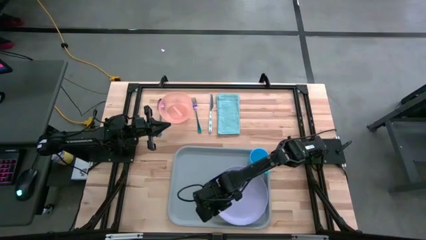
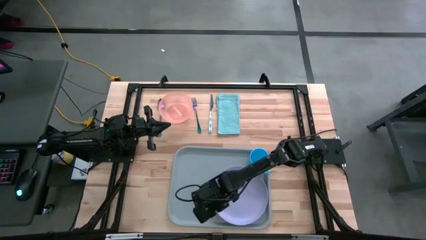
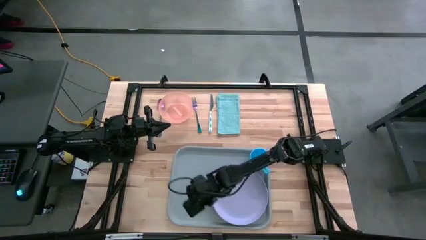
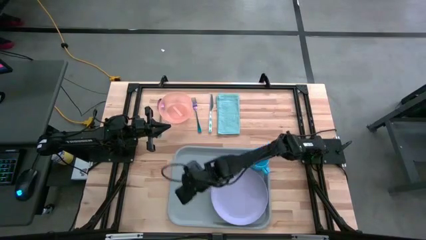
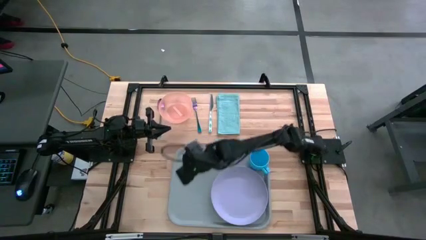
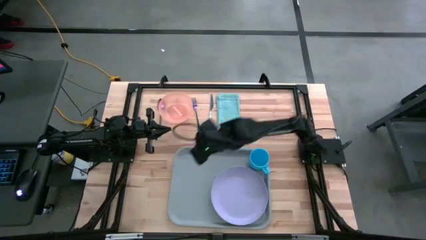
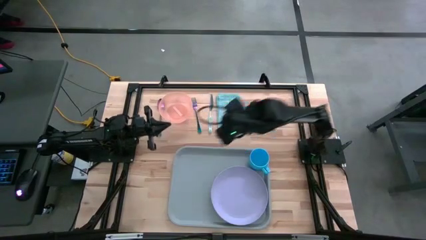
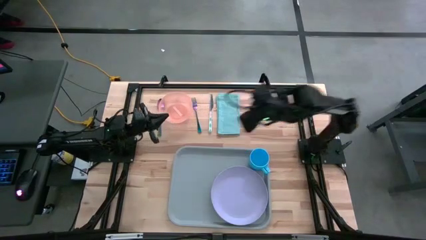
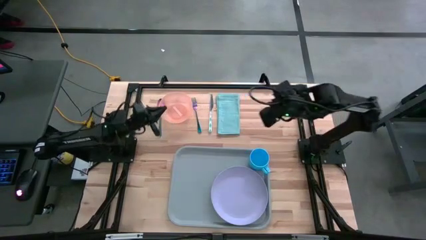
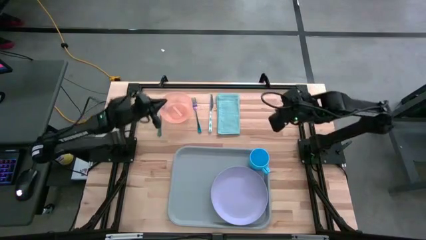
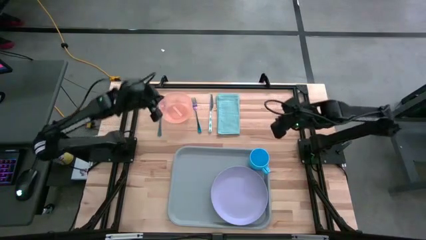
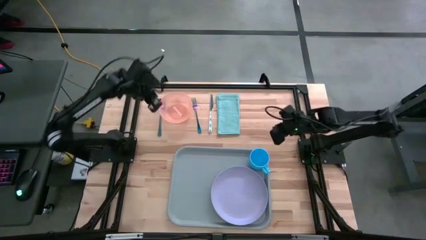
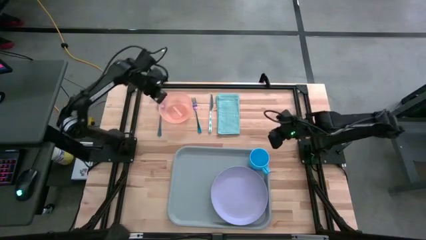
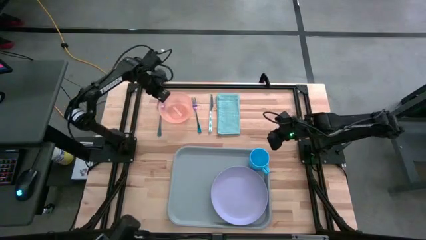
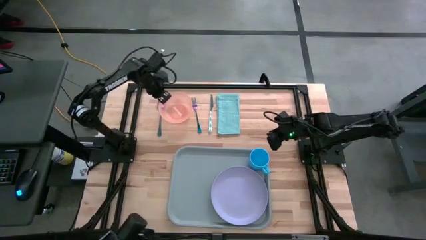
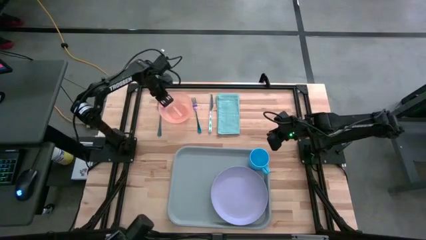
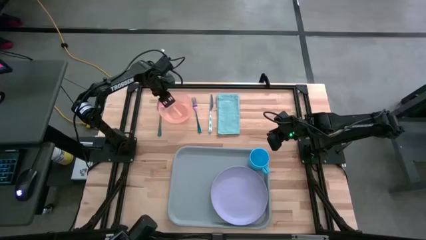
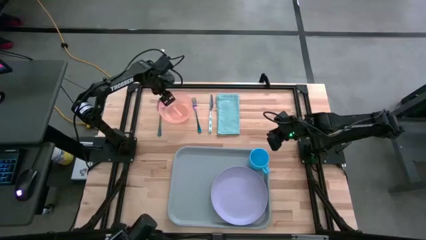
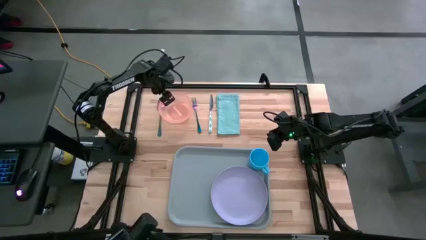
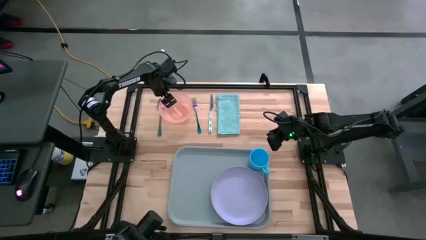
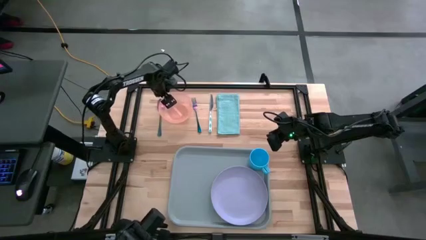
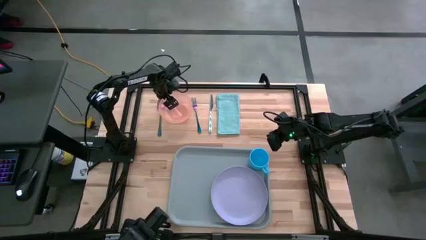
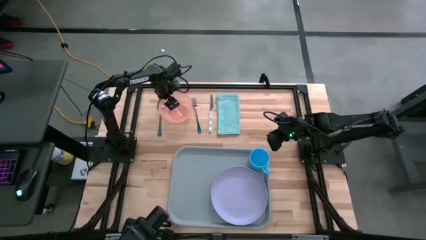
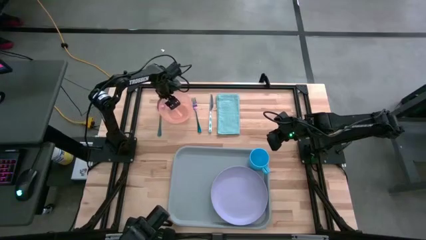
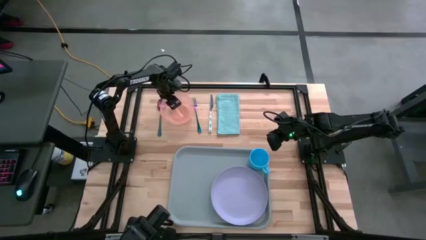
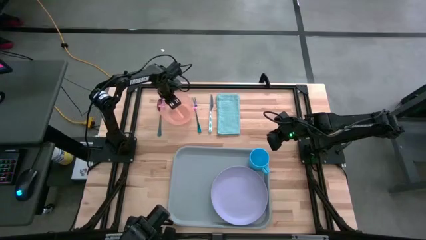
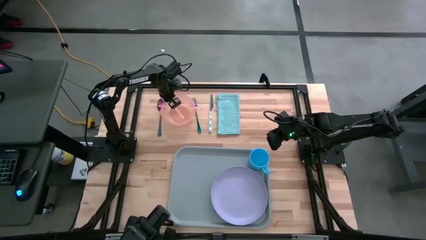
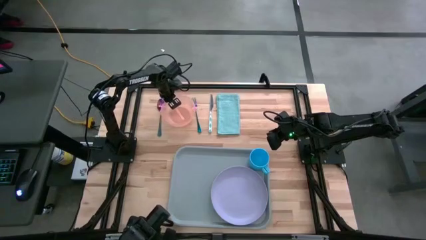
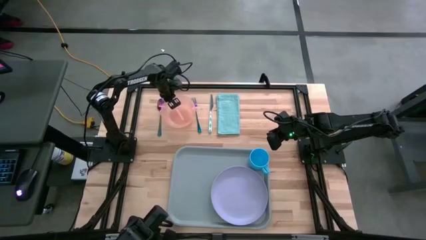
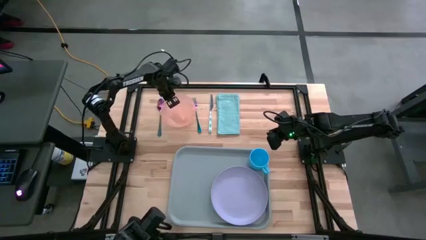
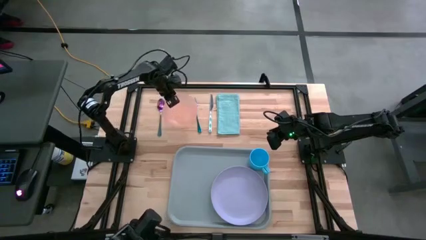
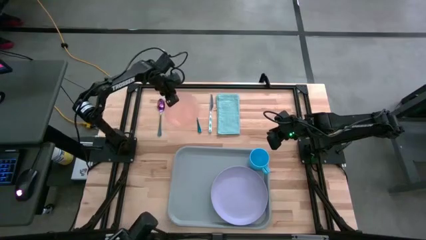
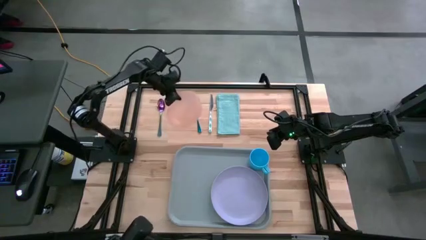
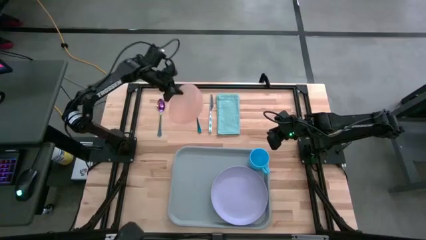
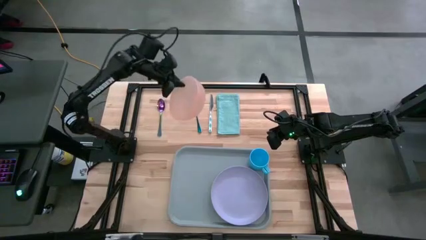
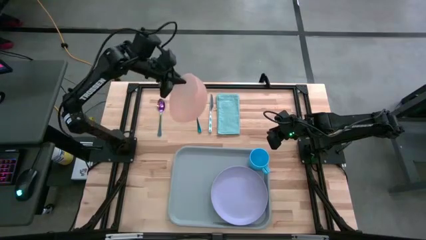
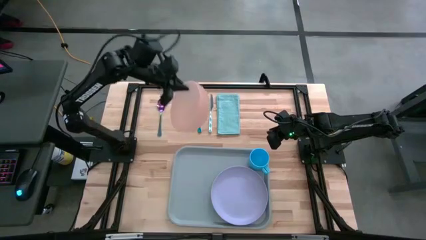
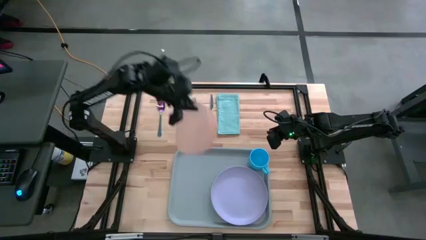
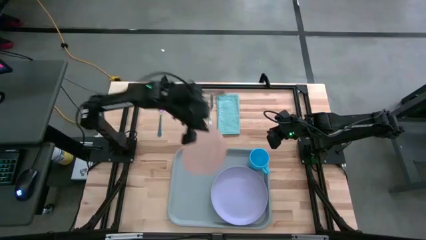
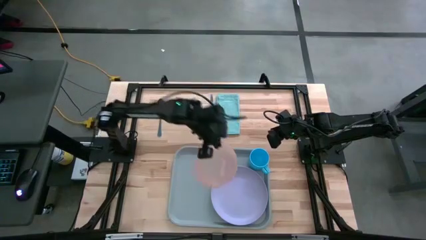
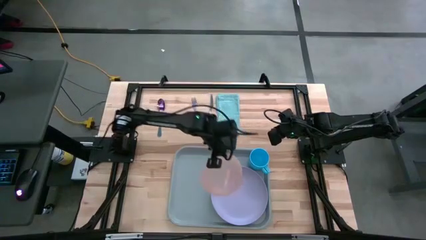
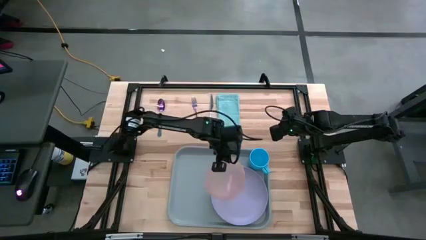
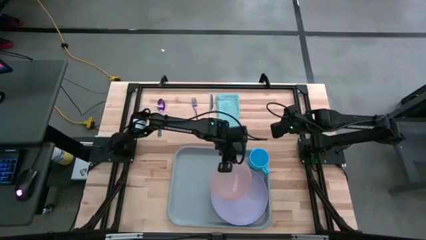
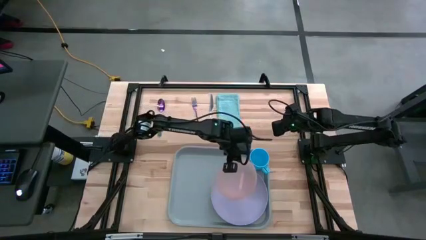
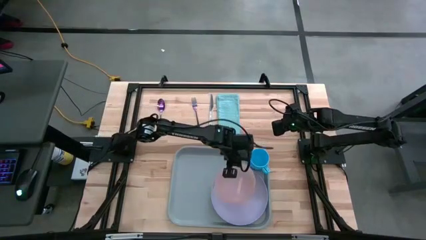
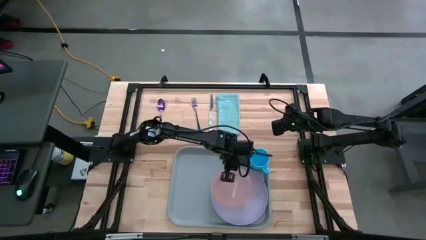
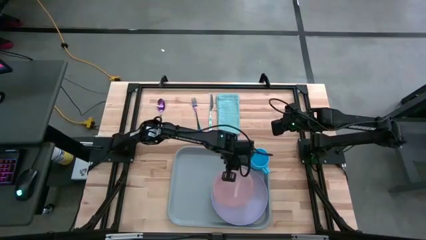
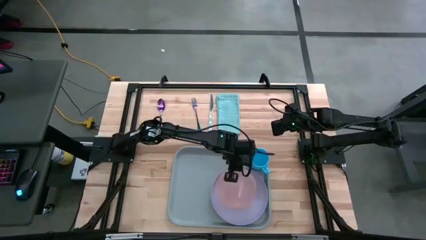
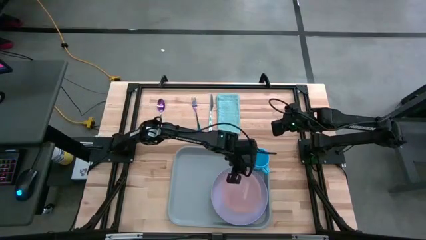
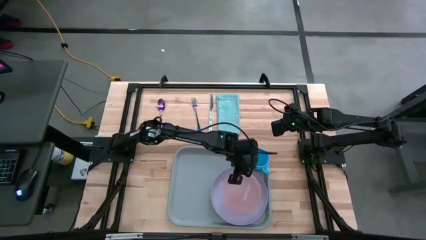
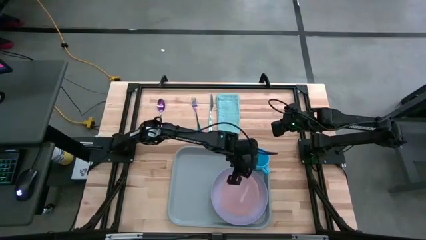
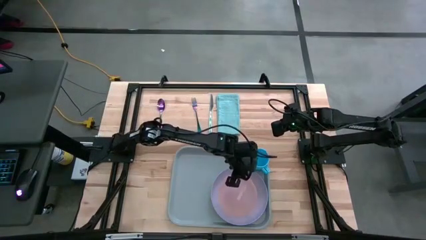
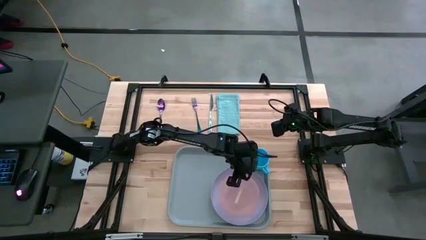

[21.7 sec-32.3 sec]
Task: Set up tray
Put the orange bowl on top of the purple plate on the gray tray

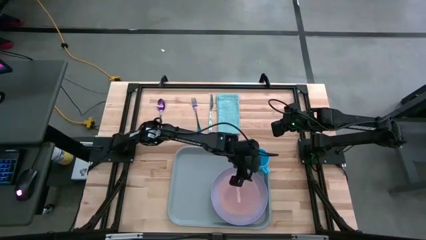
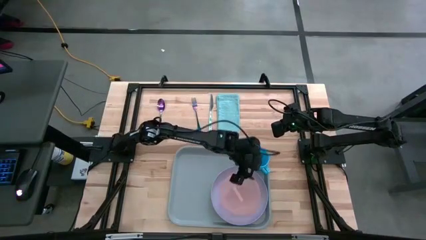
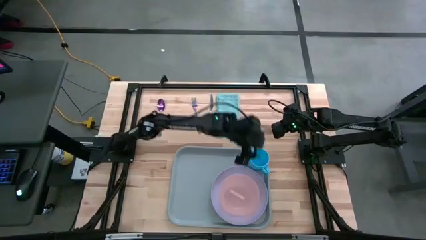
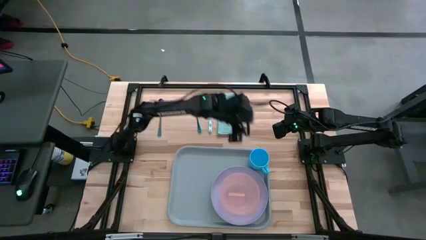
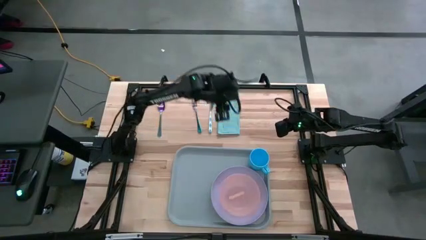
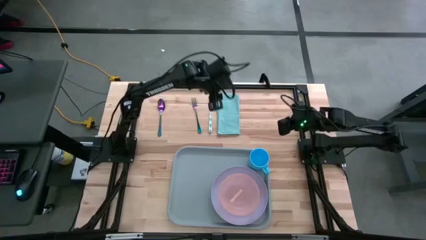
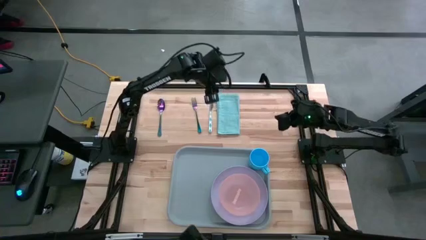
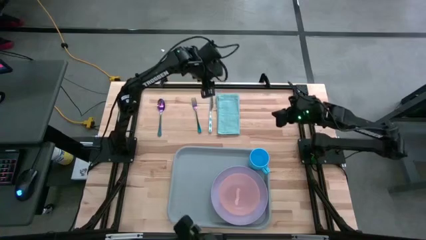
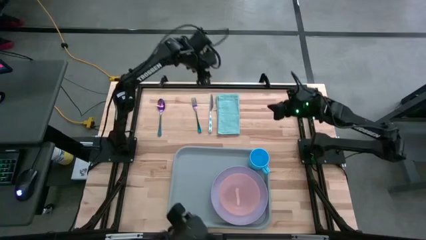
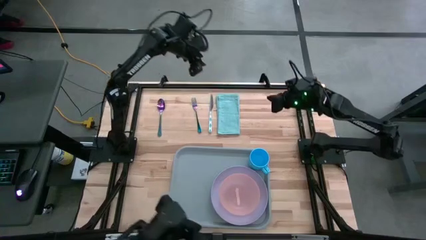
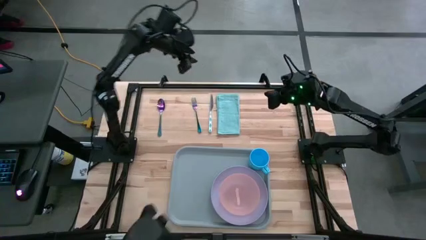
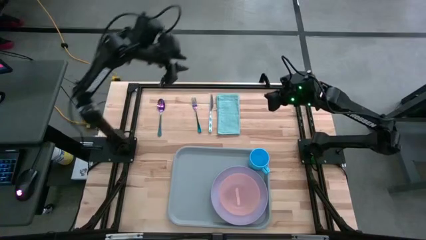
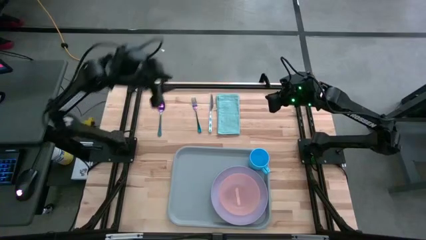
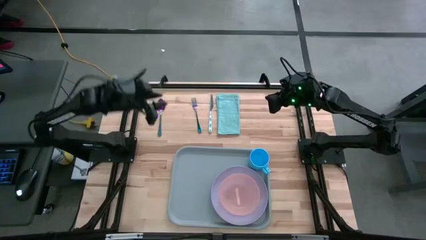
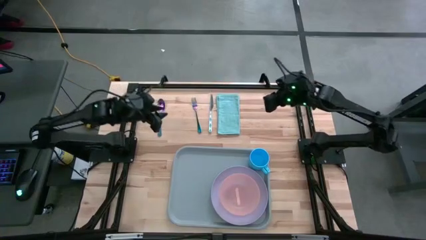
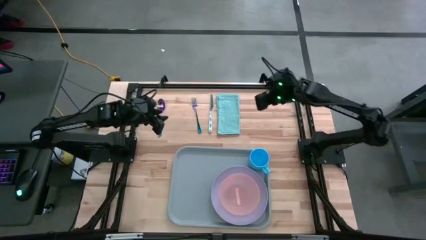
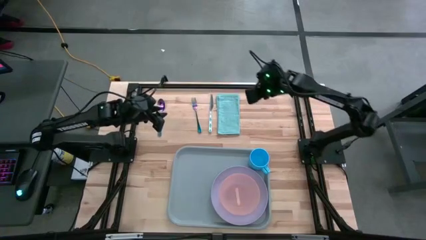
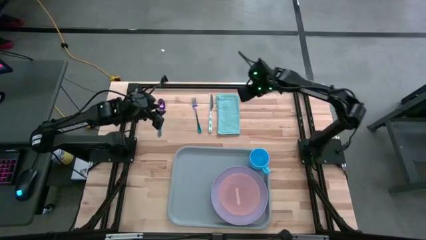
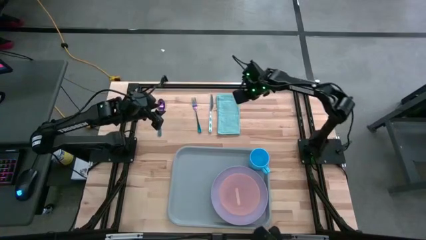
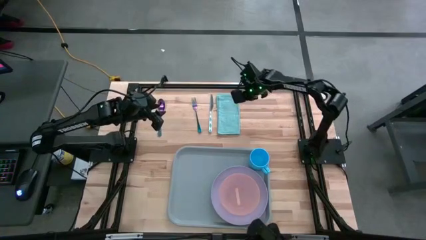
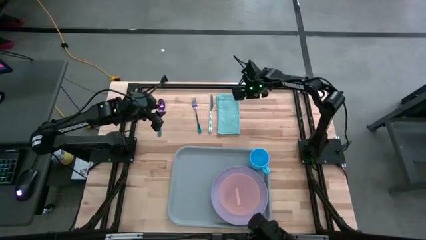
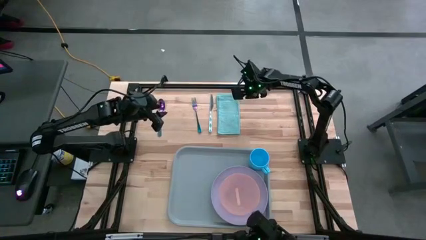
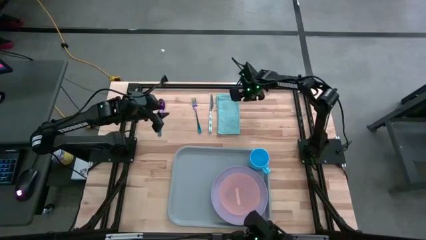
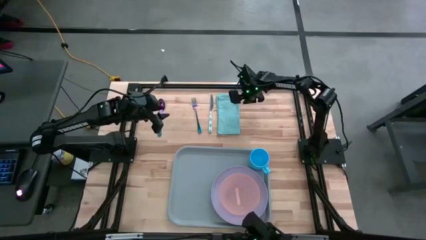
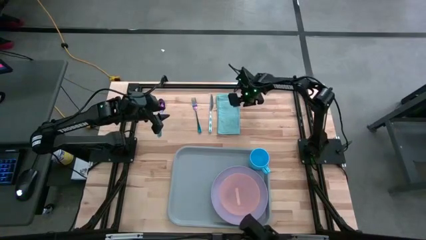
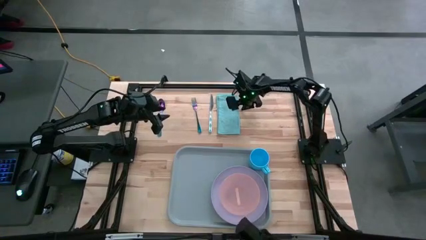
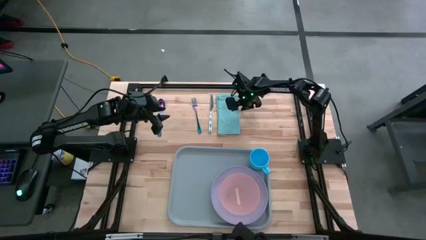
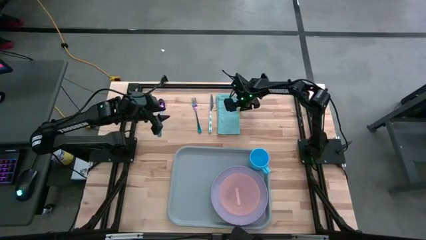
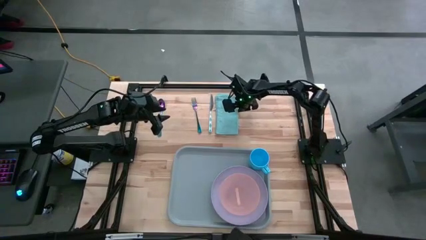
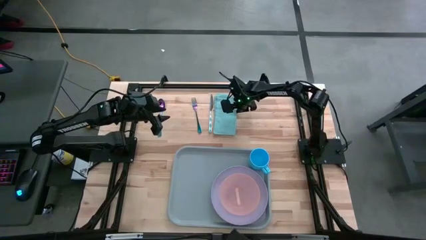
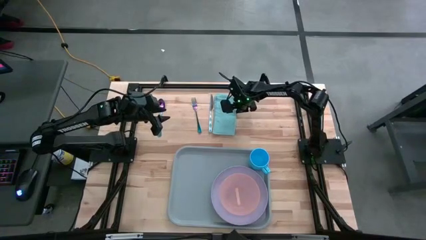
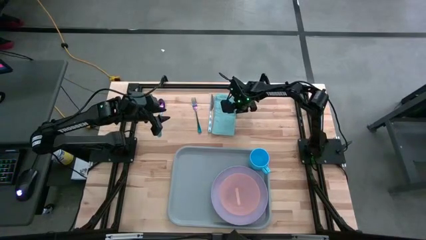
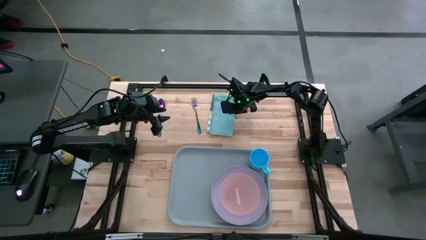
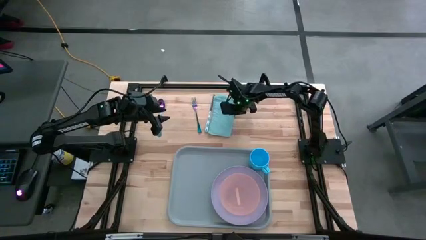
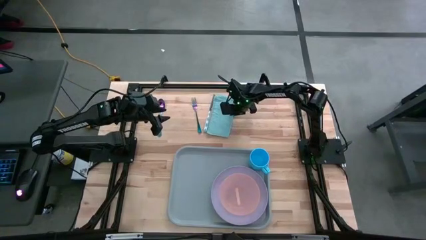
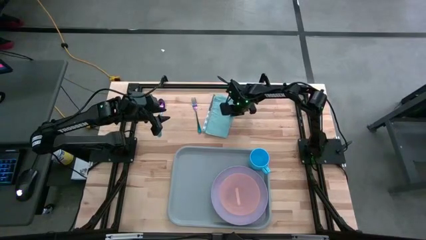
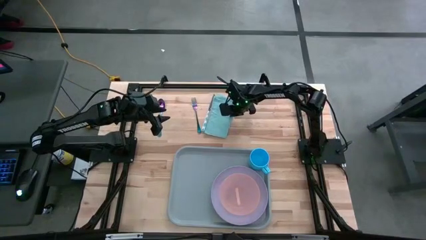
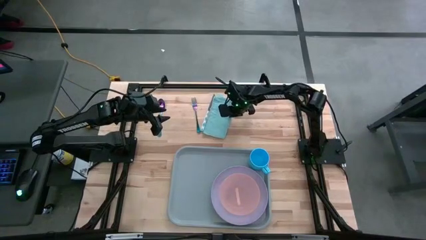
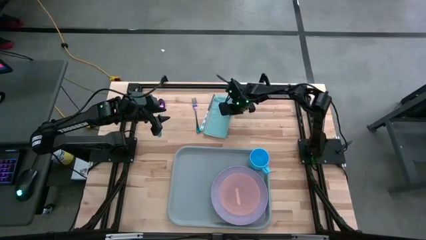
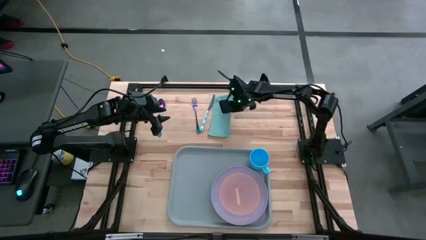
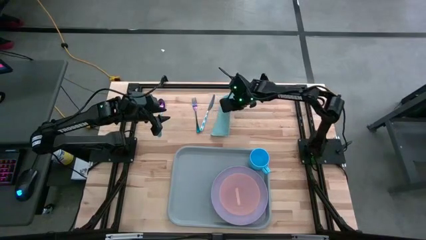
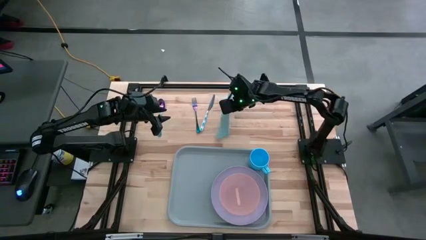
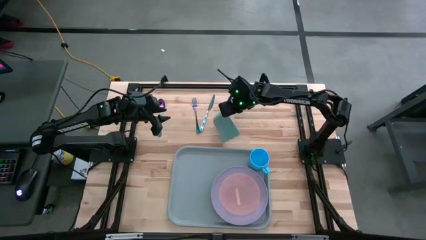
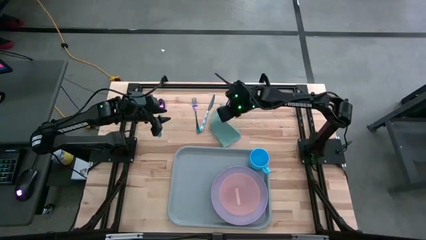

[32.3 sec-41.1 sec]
Put the blue napkin on the gray tray to the left of the purple plate
